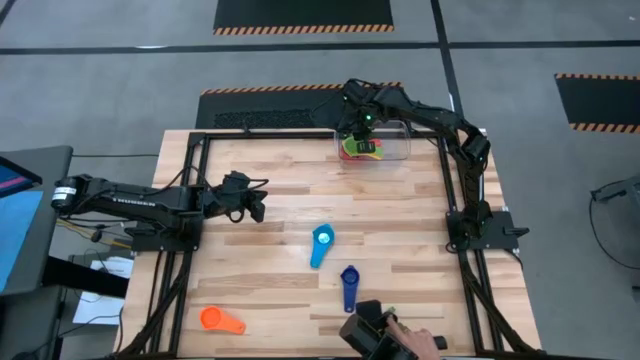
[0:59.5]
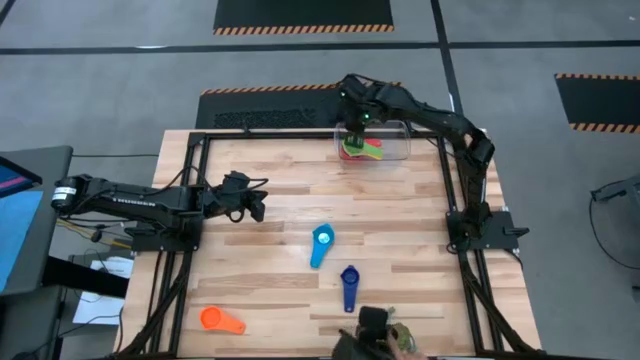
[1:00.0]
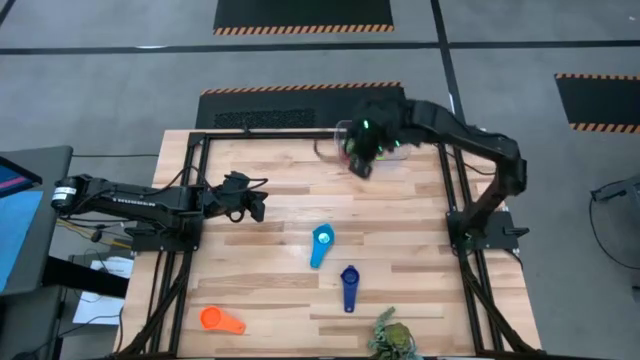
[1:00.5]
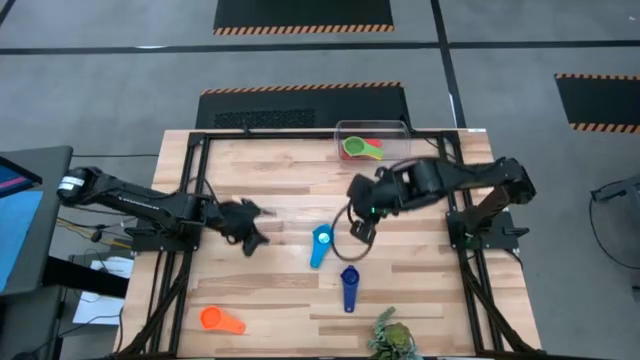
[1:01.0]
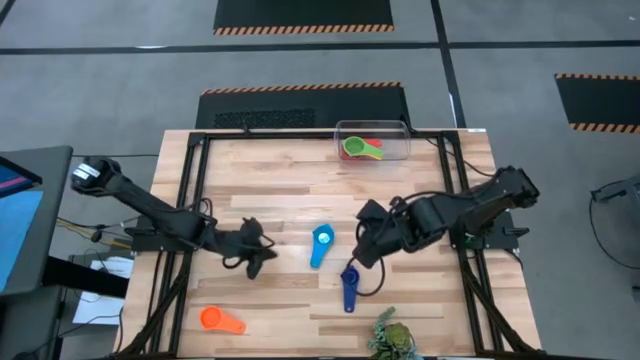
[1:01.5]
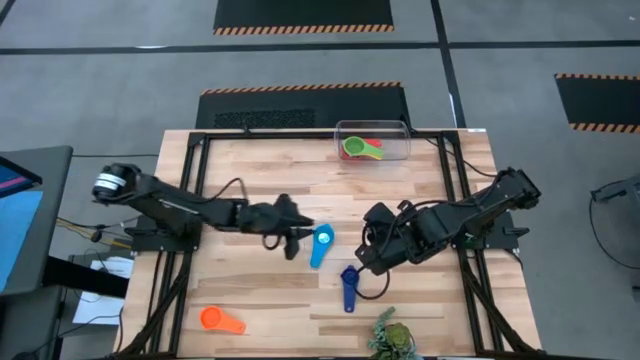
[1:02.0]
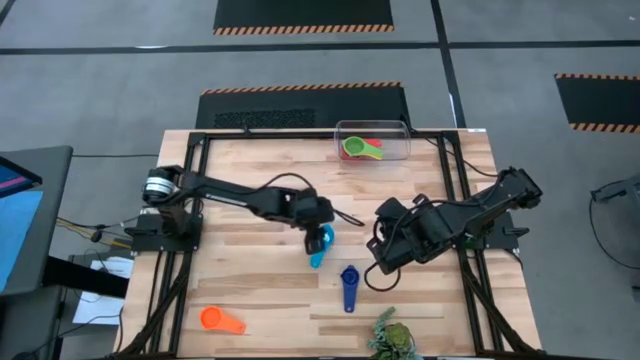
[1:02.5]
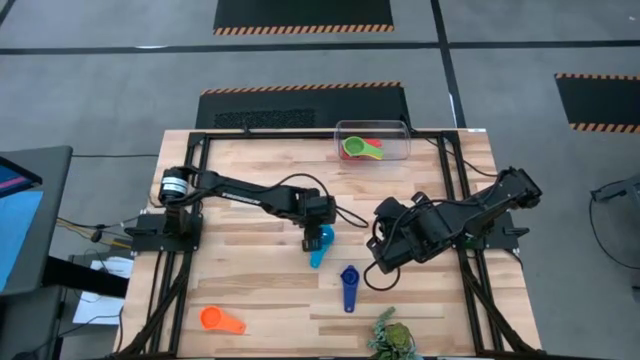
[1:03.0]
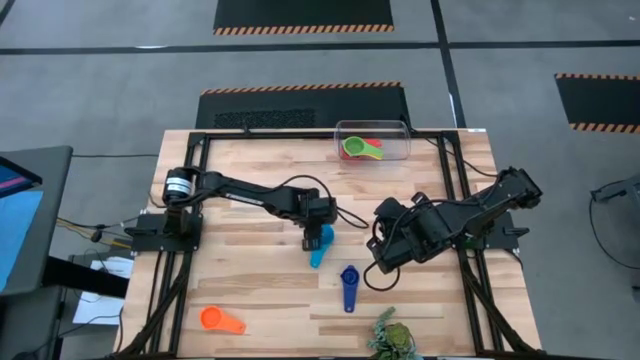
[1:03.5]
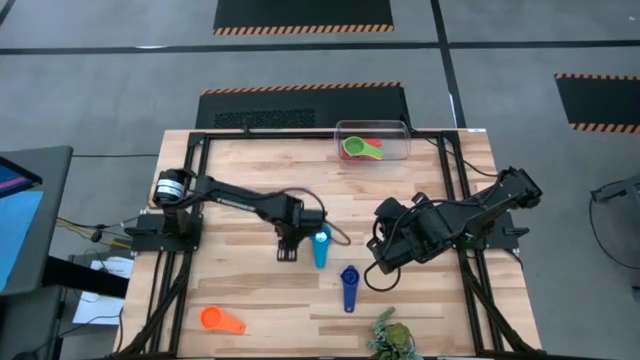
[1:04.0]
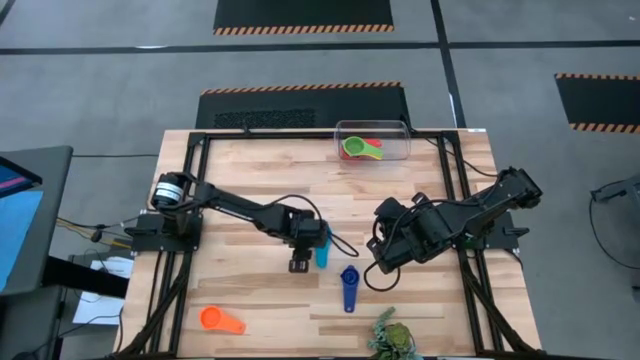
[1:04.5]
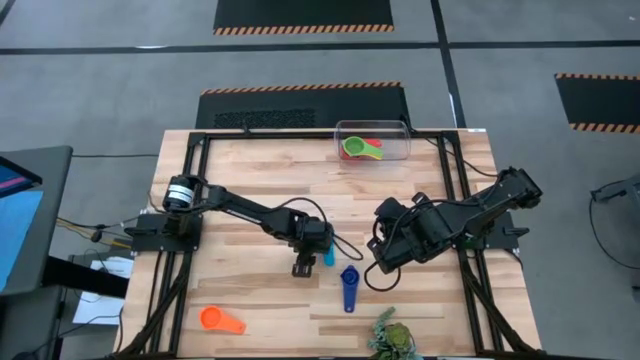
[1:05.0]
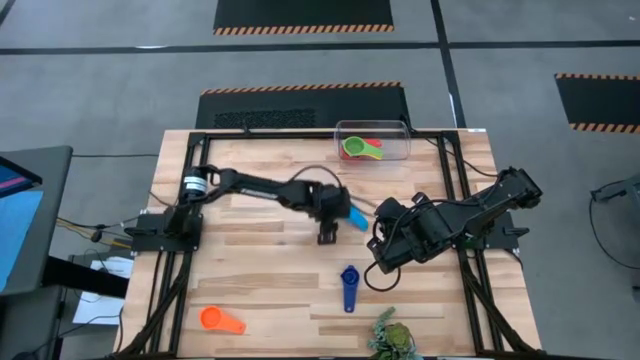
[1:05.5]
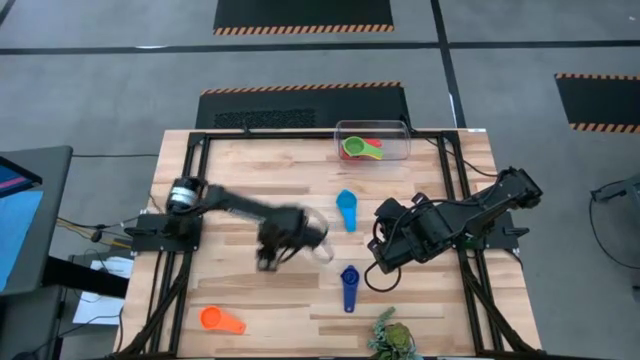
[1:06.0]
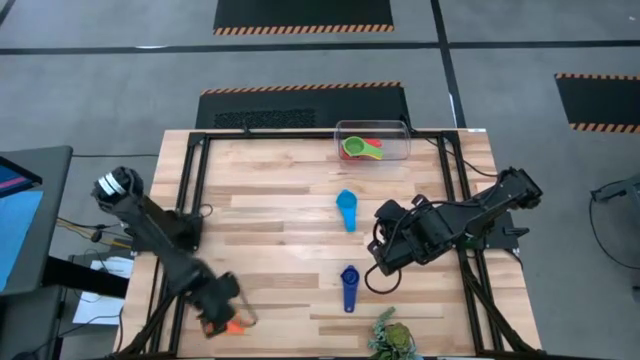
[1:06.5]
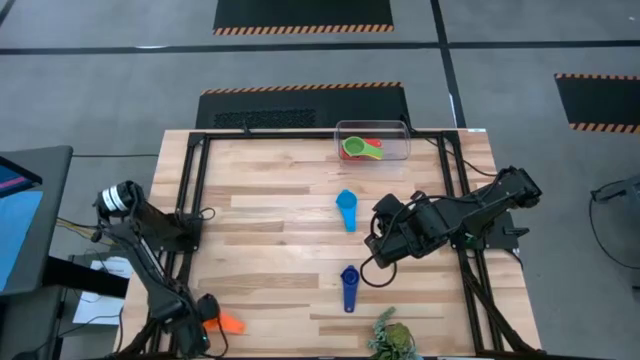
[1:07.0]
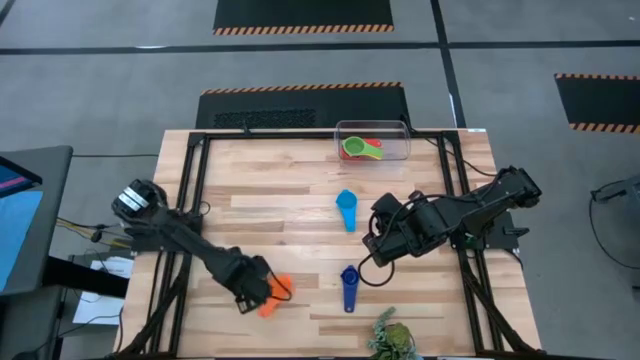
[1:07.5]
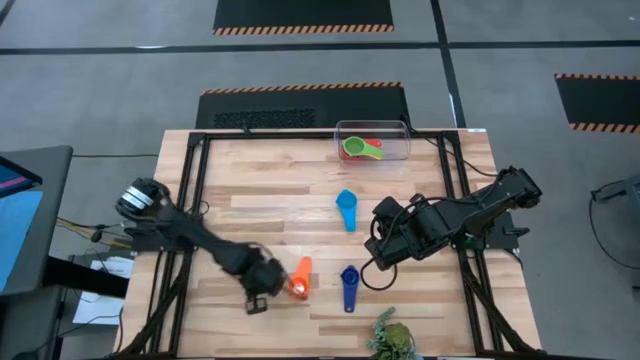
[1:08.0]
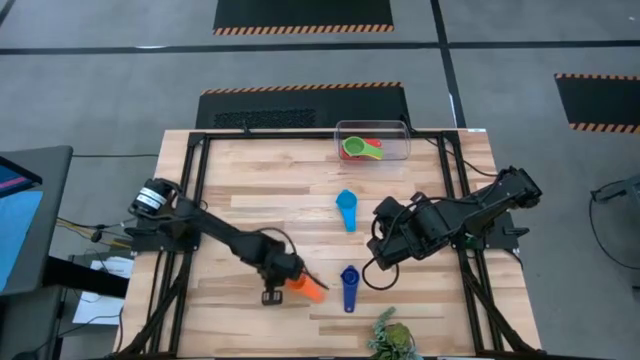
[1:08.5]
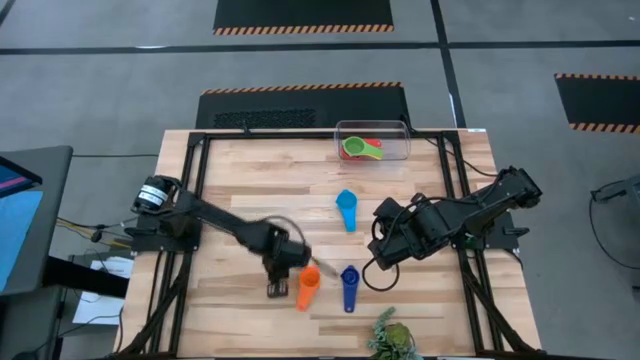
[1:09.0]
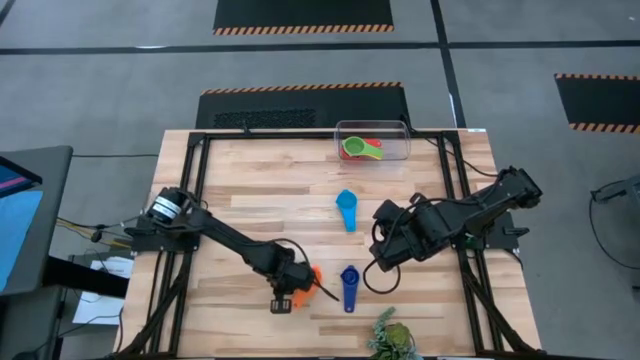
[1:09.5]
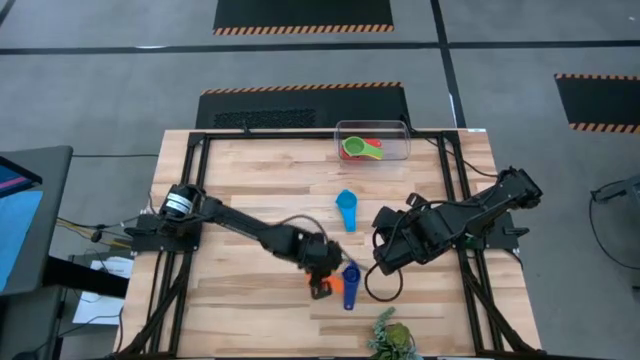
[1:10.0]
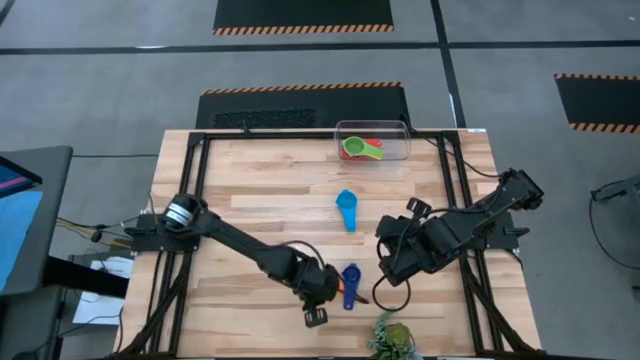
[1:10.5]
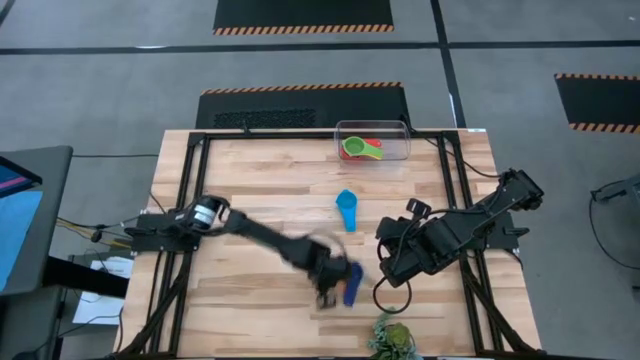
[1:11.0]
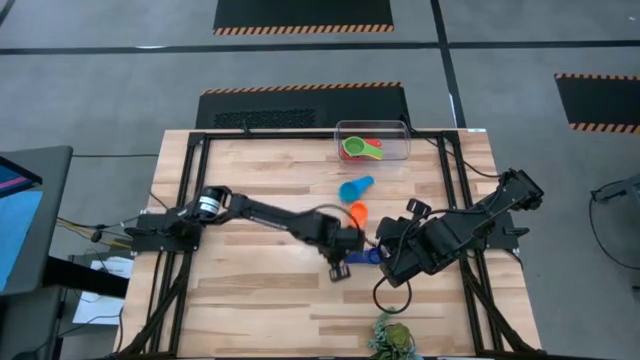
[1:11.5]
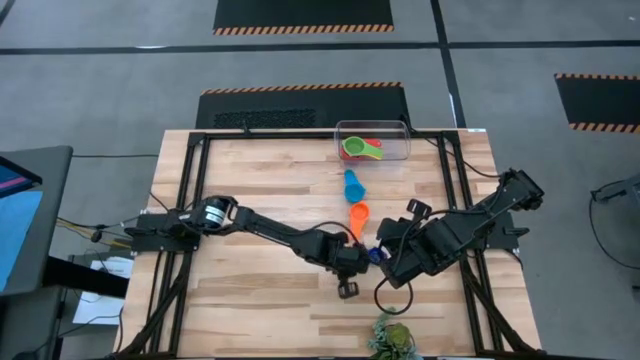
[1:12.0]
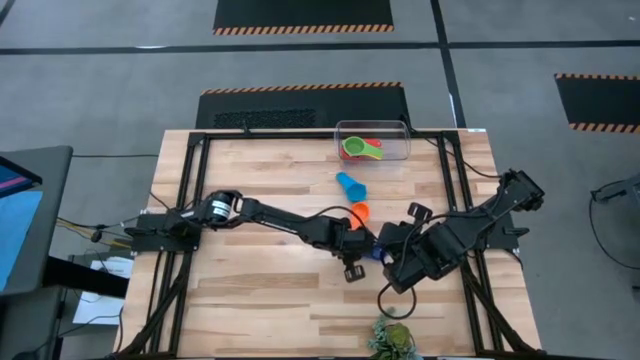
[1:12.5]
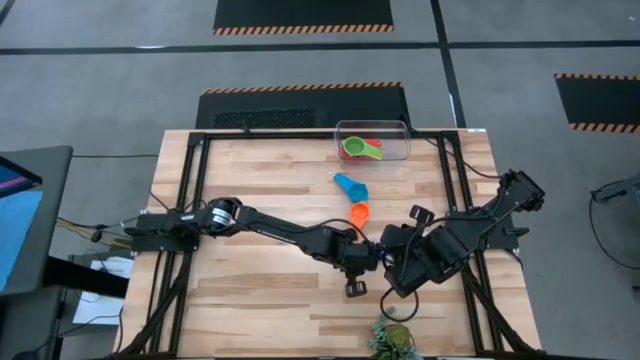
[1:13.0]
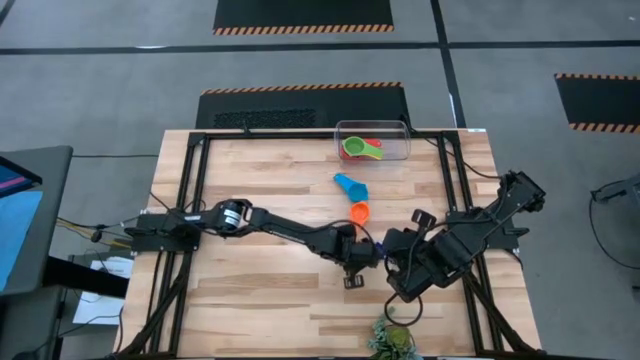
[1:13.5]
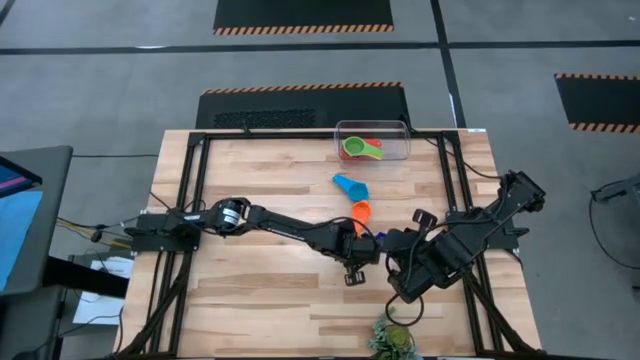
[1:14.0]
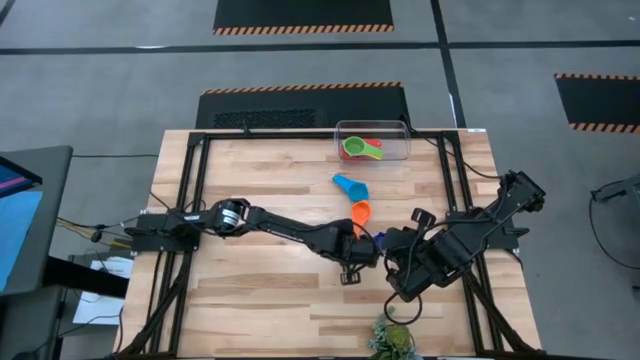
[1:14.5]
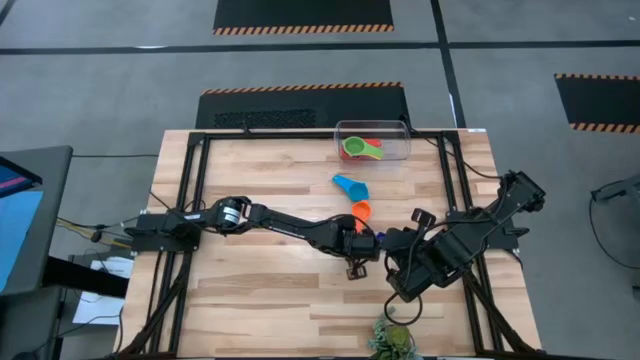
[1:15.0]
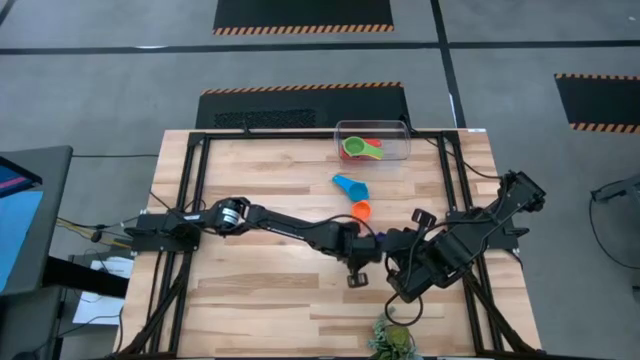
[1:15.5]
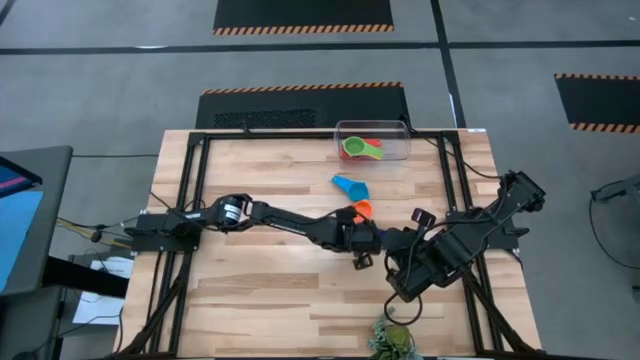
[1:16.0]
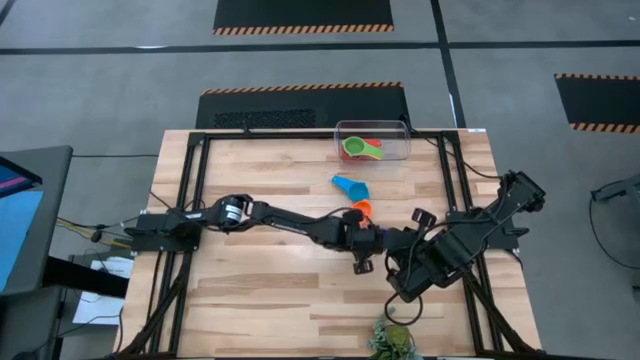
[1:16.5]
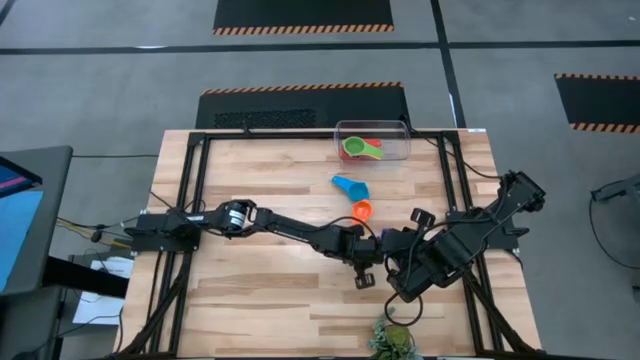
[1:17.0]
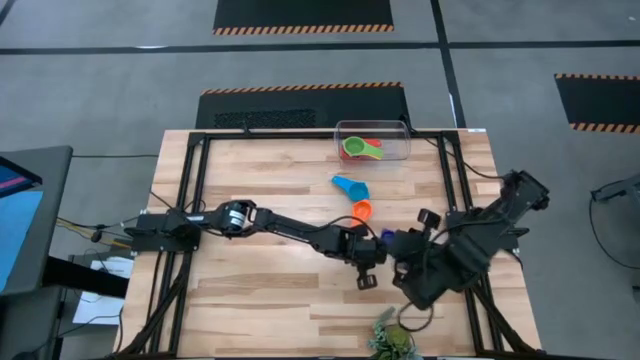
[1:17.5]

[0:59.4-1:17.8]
Task: Nest measuring cups in basket
Adjust the colored measuring cups to the top center of the table

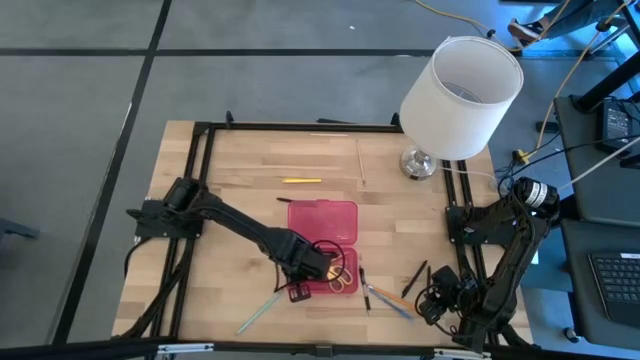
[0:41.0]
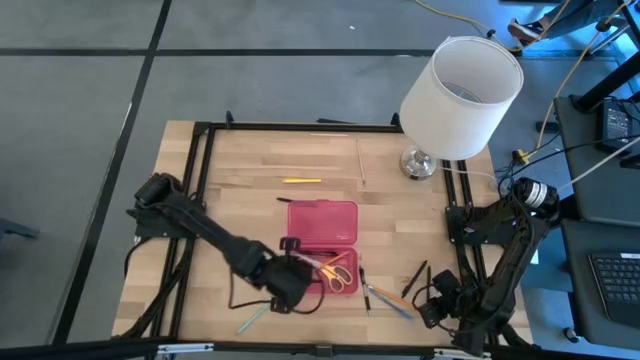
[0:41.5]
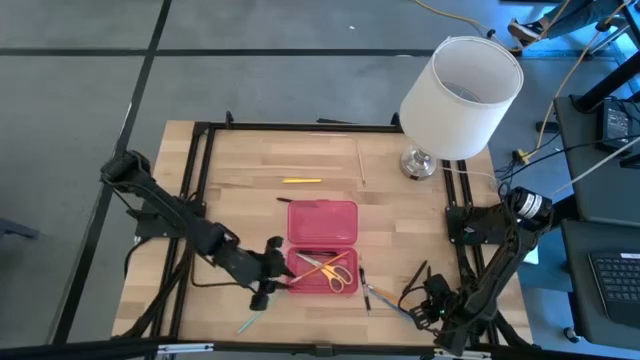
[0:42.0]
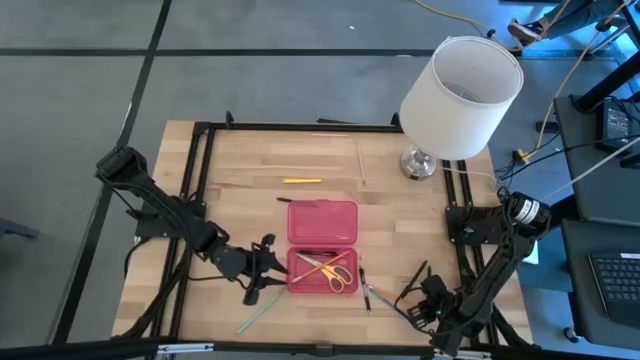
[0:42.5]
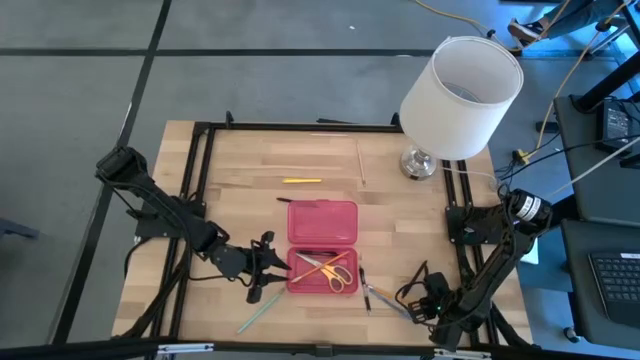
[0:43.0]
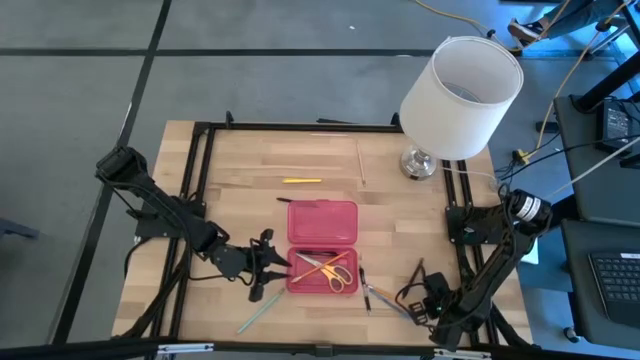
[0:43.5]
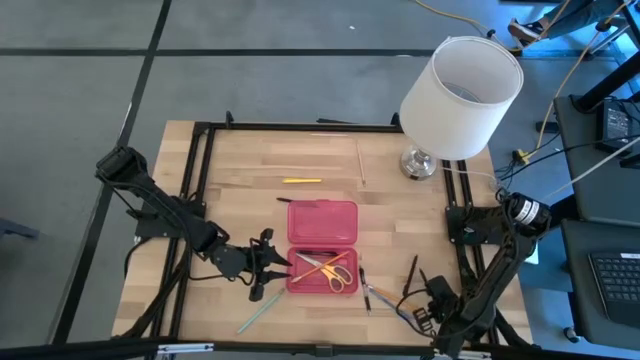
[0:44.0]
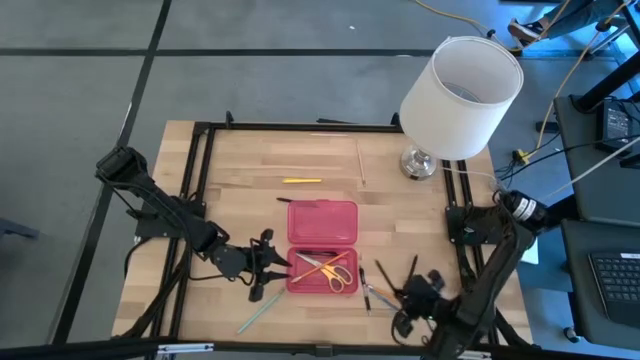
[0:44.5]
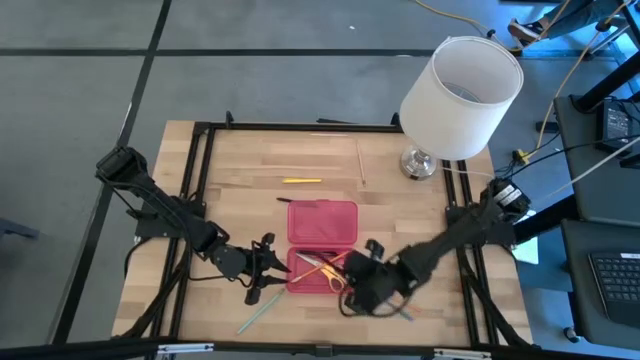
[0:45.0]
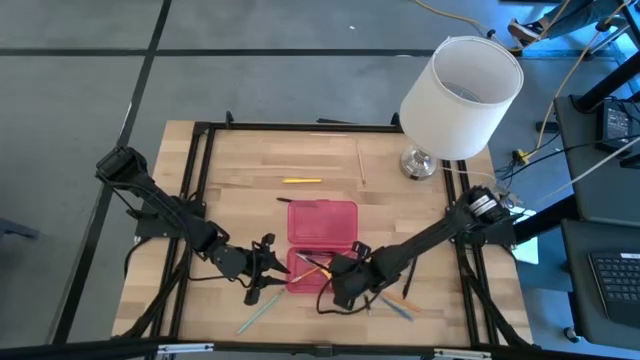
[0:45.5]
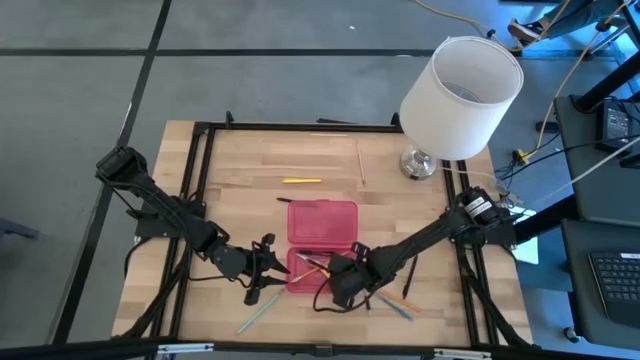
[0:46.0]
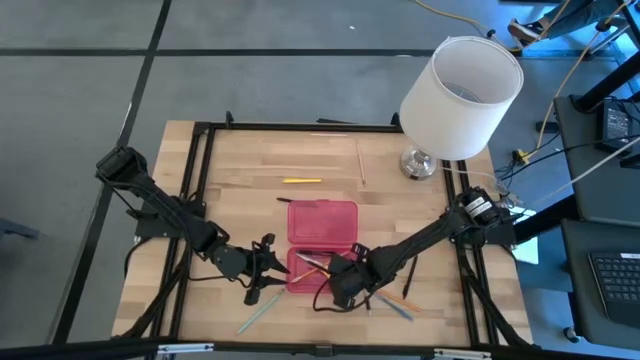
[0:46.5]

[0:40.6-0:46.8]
Task: Pick & place school supplies into a supply box
Put the black pen into the red supply box
